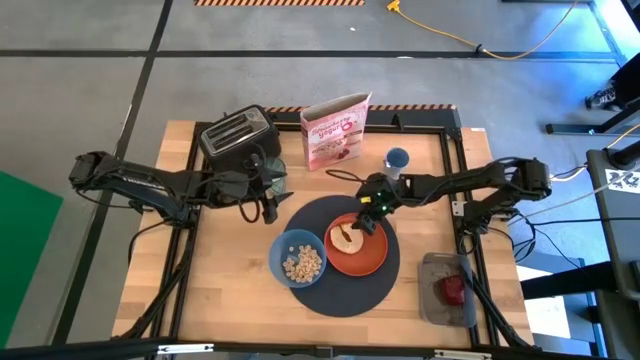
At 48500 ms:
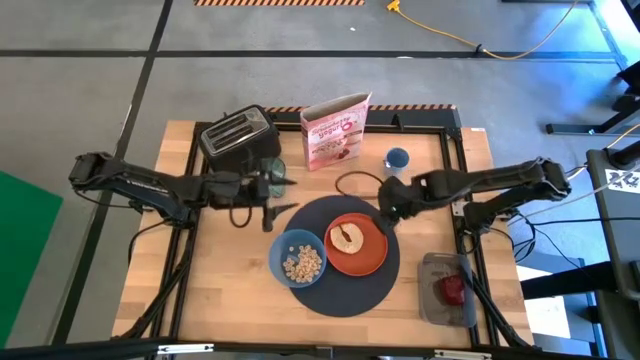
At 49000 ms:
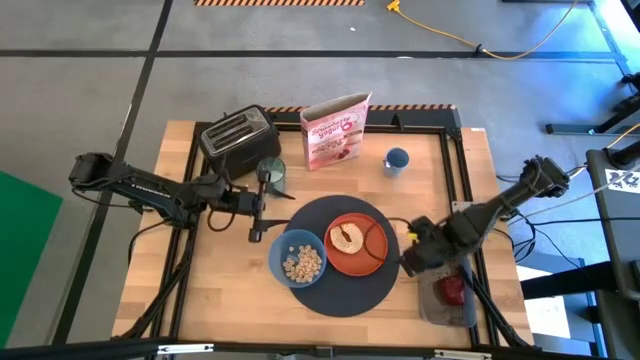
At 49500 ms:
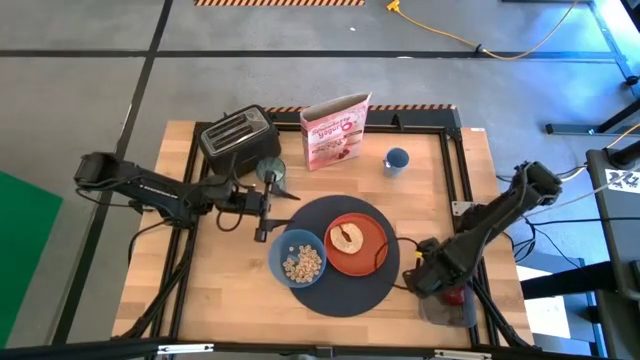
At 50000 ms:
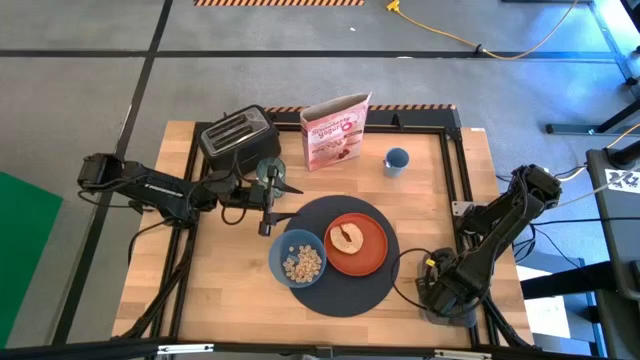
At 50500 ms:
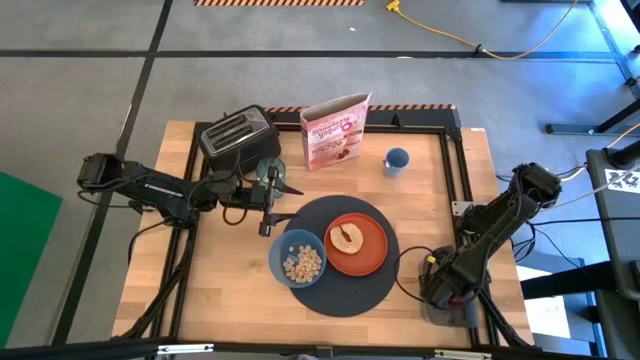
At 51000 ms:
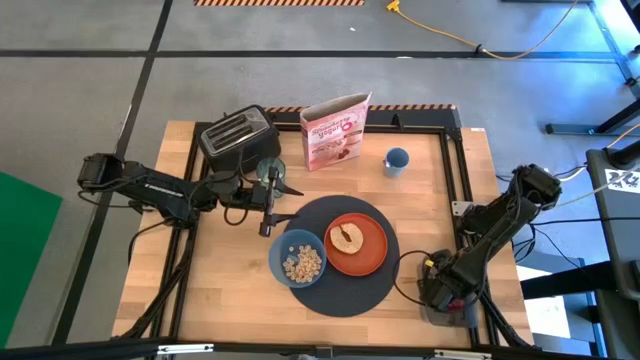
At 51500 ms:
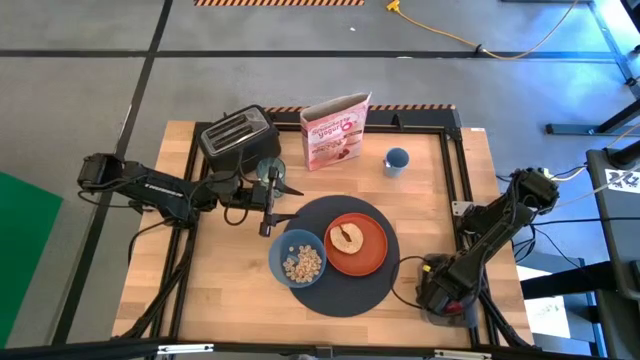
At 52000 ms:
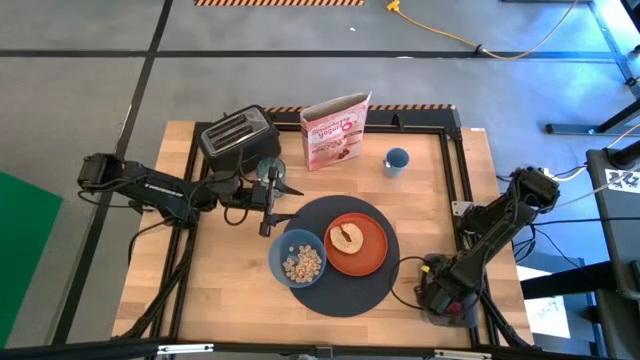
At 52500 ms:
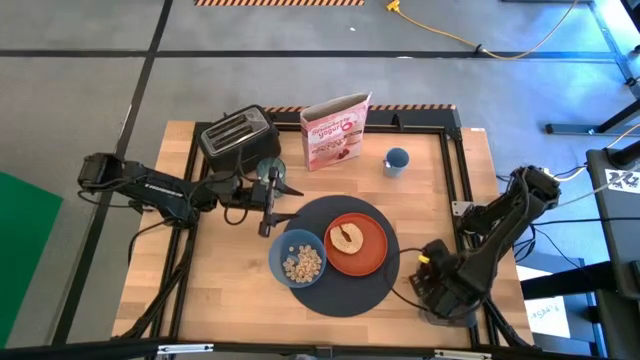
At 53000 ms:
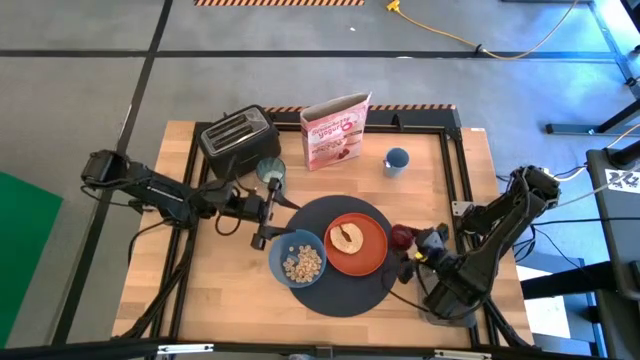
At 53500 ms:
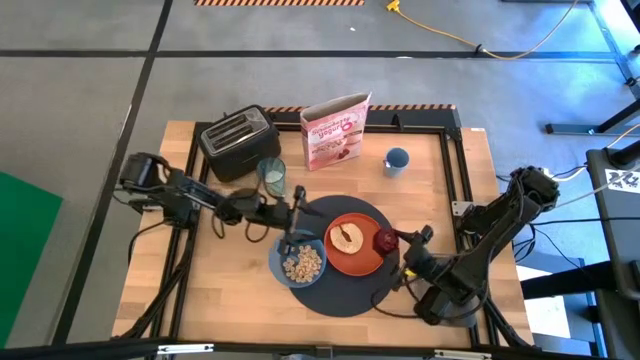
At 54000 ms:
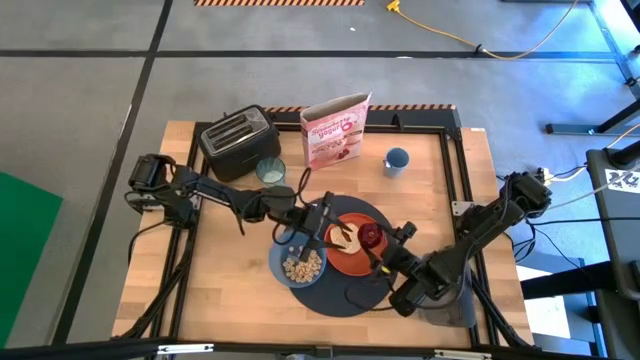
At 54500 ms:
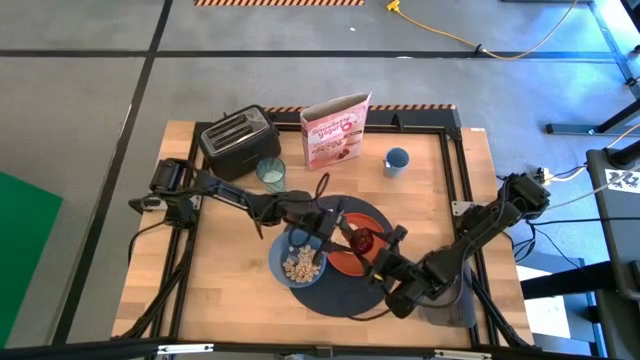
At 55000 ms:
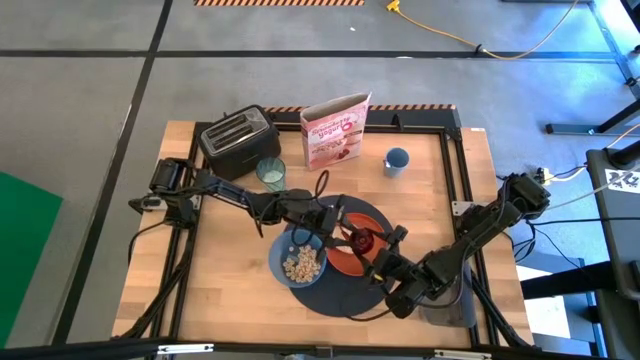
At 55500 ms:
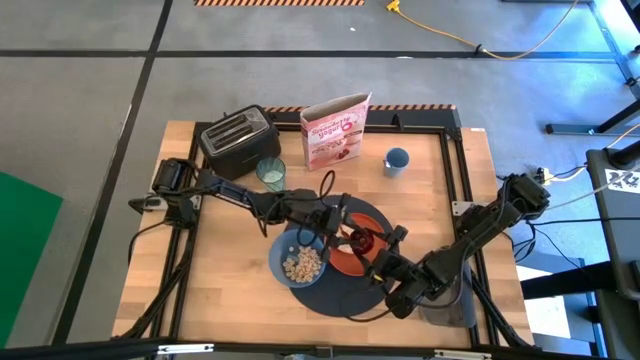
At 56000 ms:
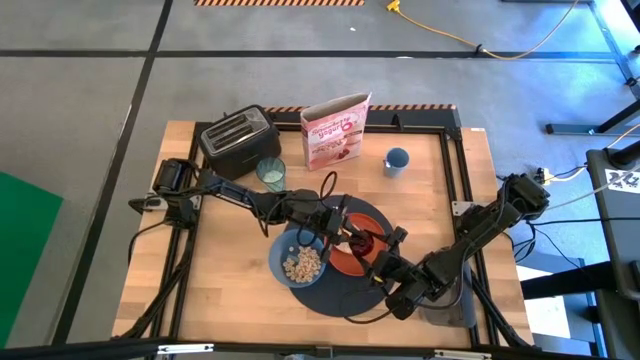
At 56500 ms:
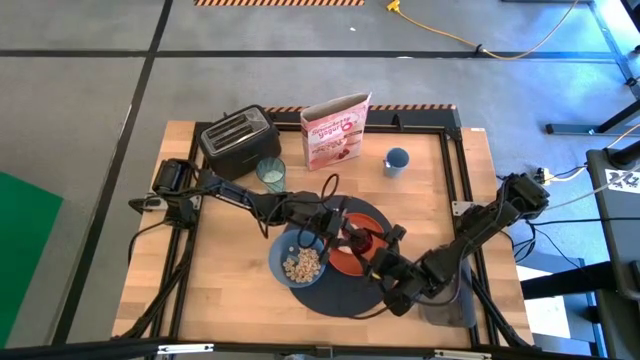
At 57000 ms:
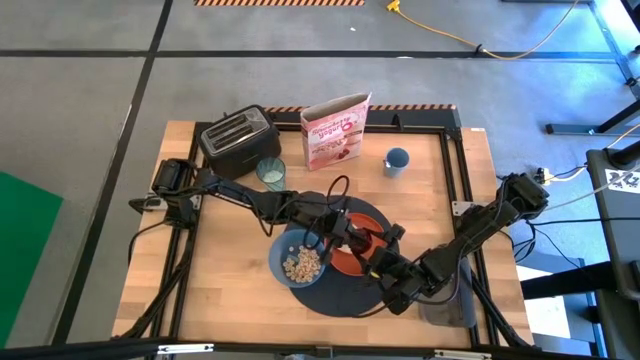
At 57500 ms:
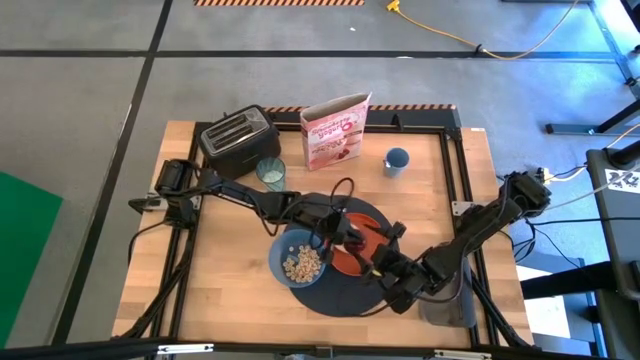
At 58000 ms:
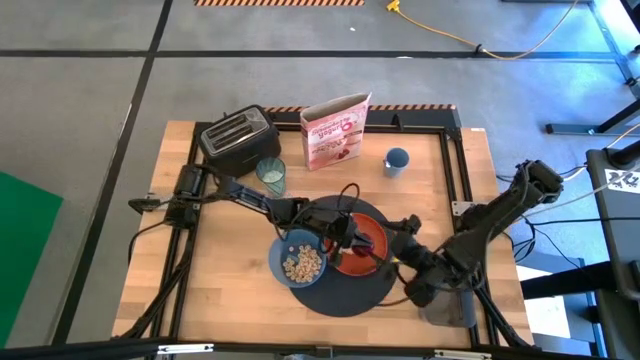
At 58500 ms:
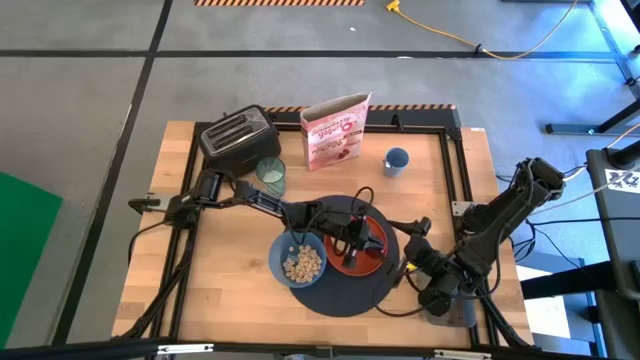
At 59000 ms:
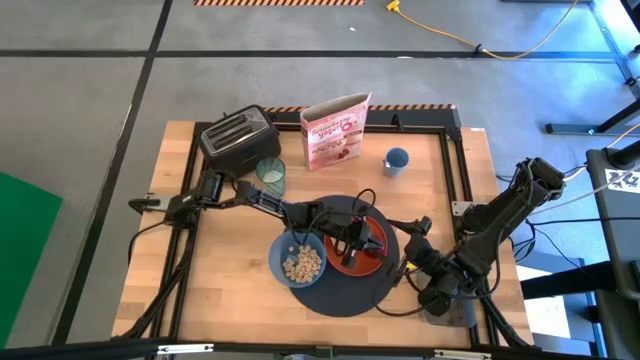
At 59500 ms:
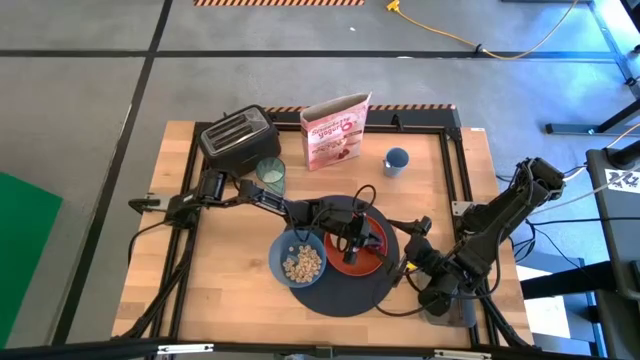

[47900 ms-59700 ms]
Task: Arrange a breakfast setting
Put the apple on the plate

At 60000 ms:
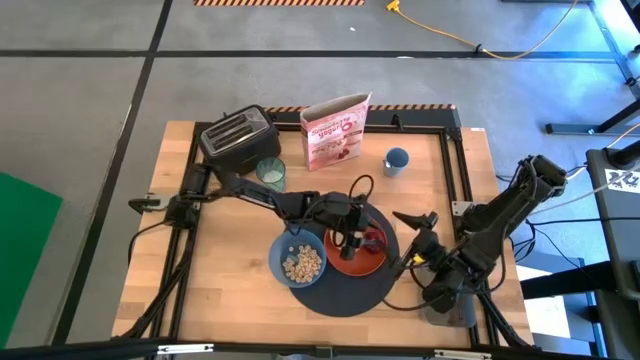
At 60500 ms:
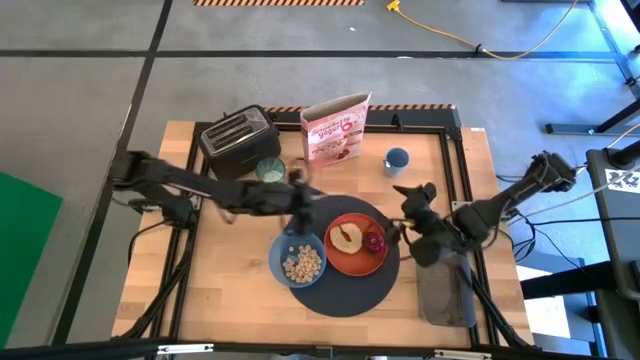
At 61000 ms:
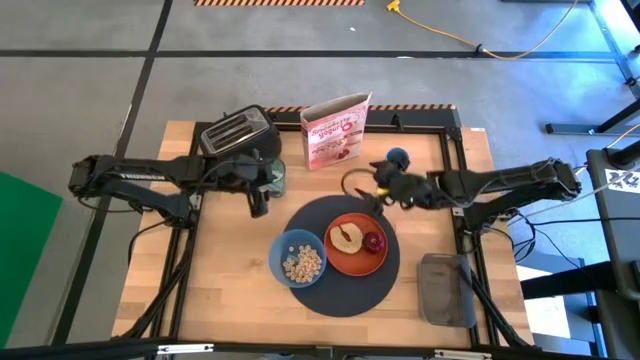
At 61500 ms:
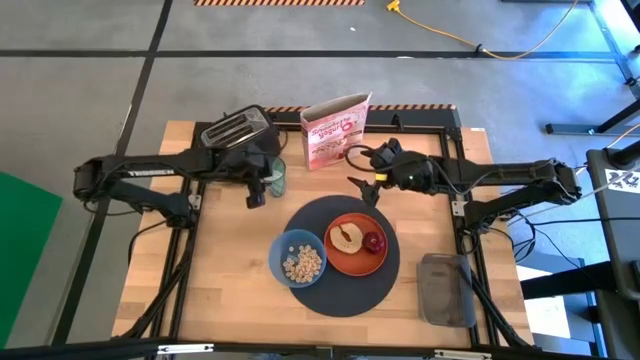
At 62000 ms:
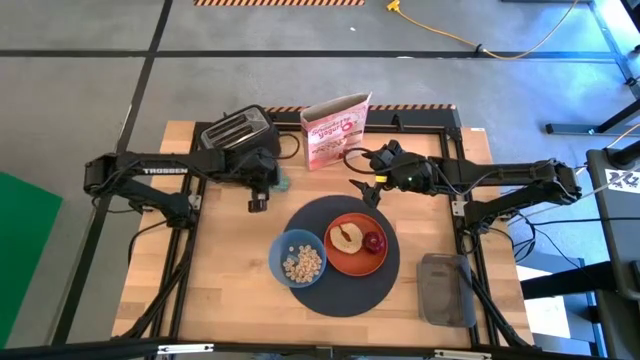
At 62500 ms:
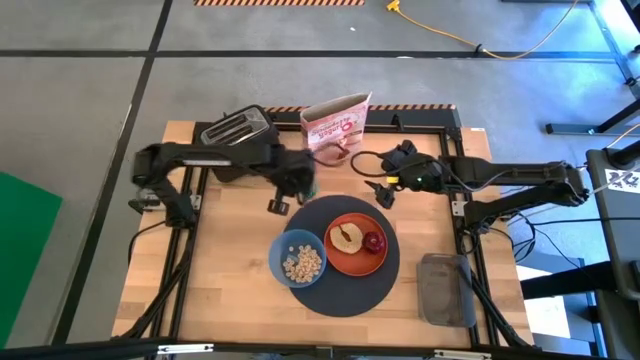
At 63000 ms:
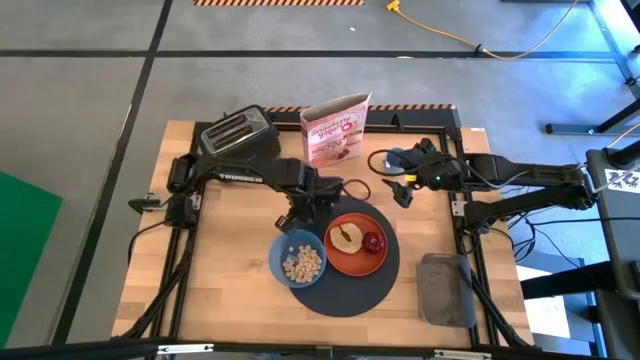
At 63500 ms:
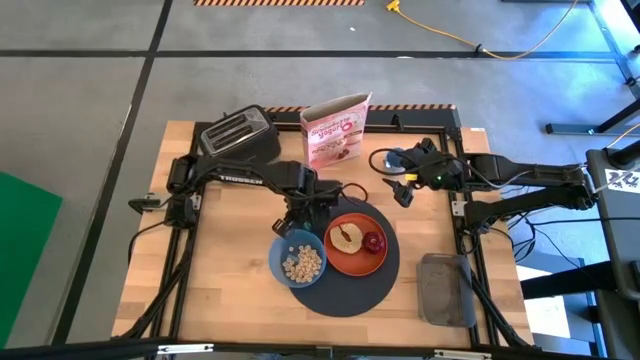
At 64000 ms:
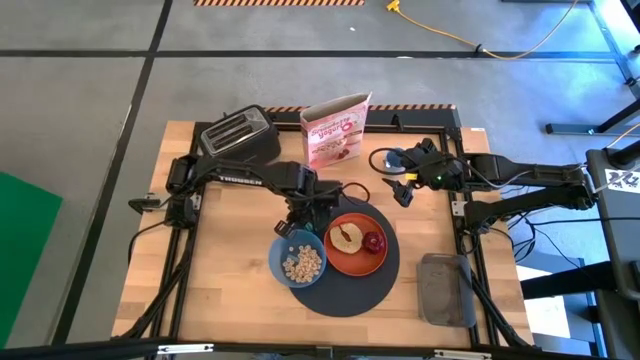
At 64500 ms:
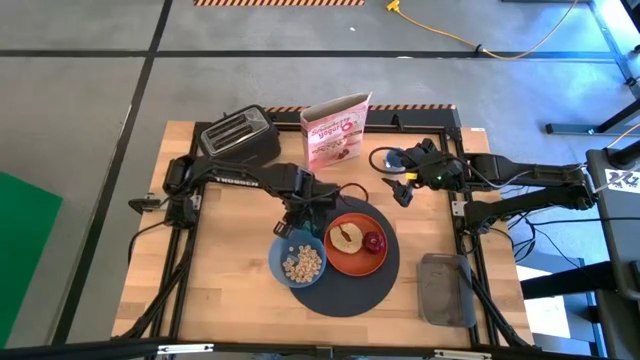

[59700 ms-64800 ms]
Put the cup of milk on the mat to the top left of the plate
